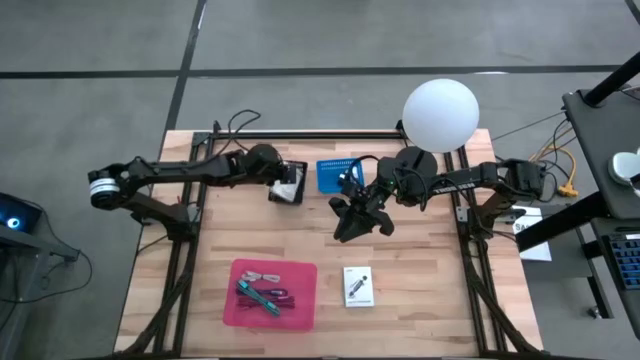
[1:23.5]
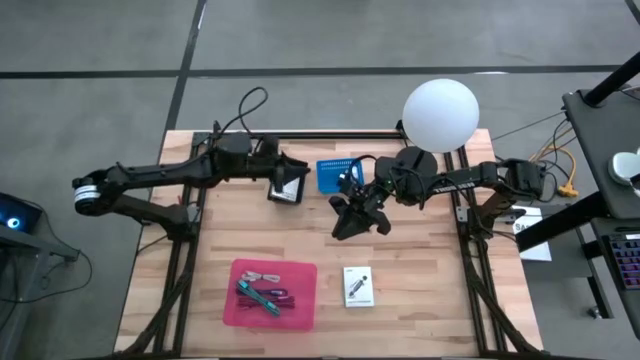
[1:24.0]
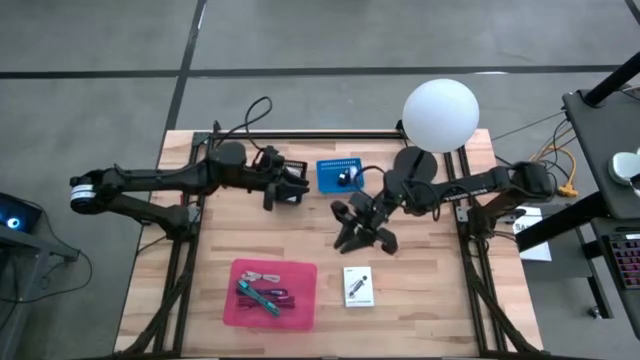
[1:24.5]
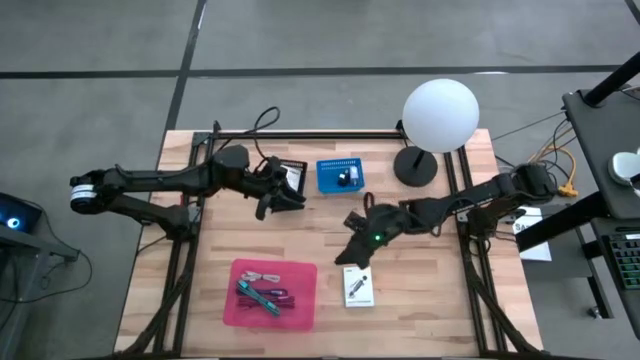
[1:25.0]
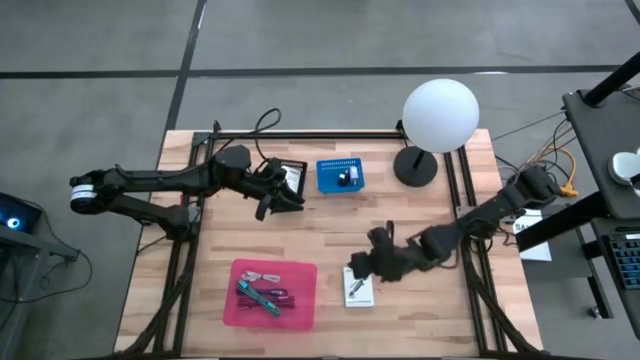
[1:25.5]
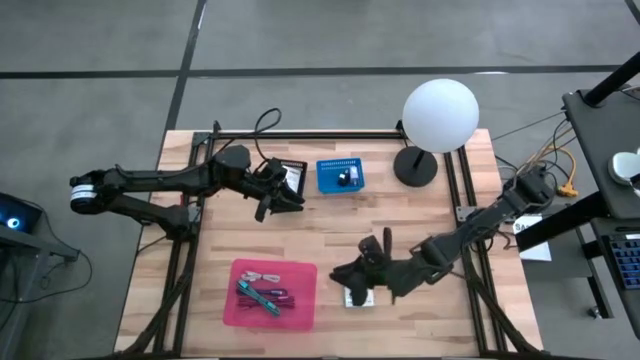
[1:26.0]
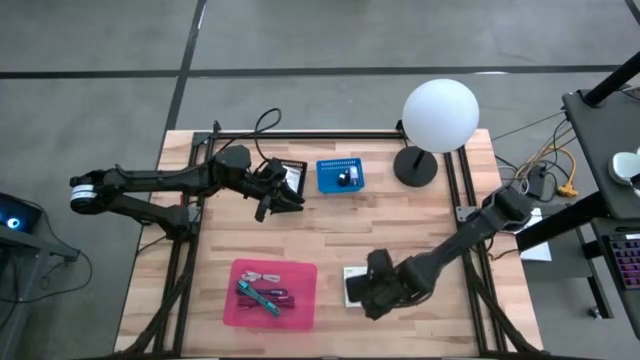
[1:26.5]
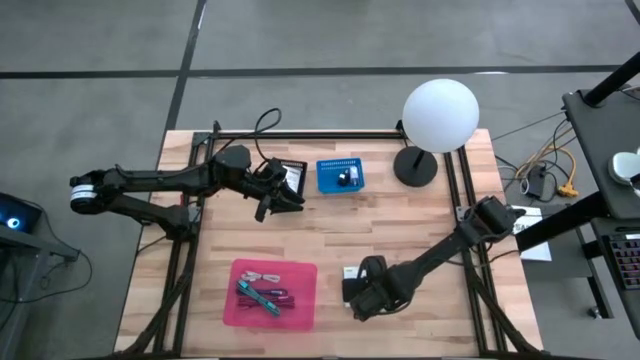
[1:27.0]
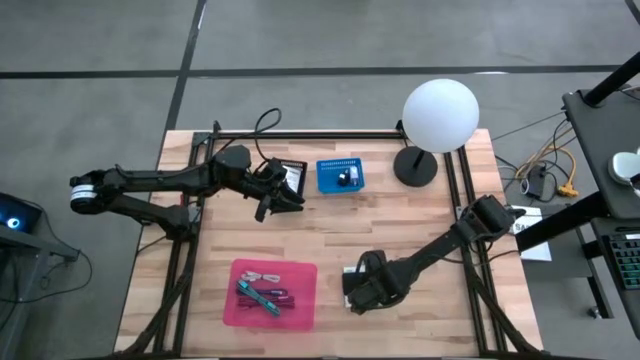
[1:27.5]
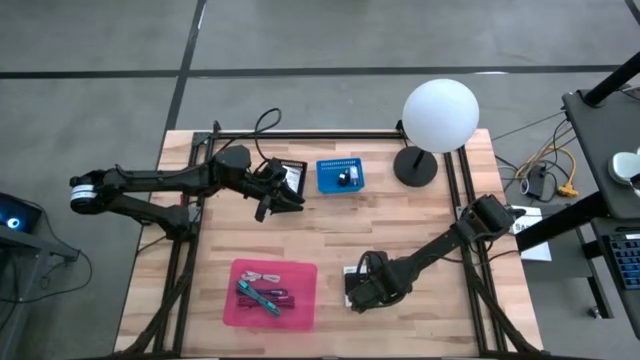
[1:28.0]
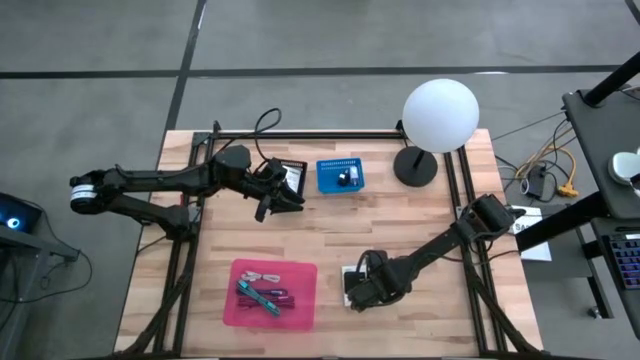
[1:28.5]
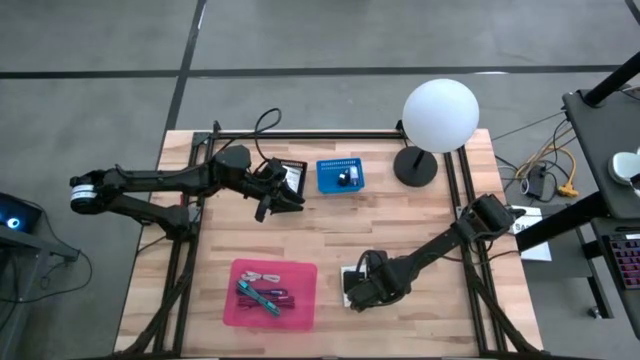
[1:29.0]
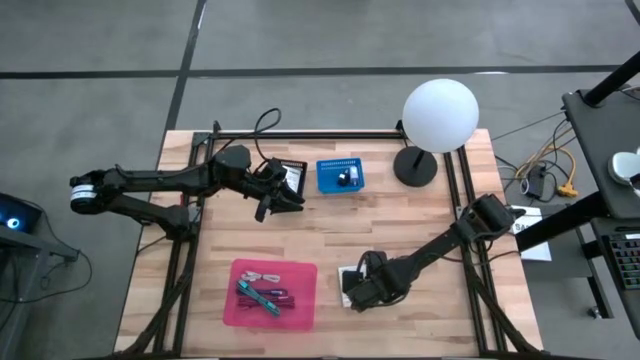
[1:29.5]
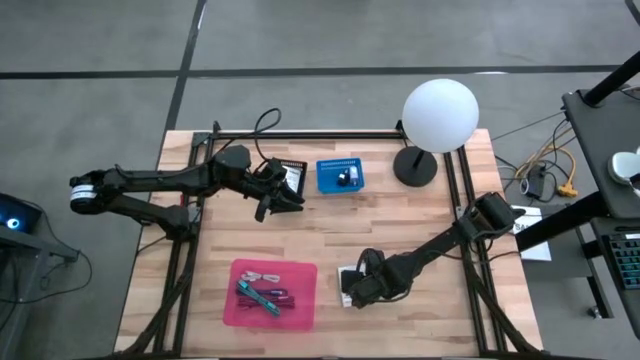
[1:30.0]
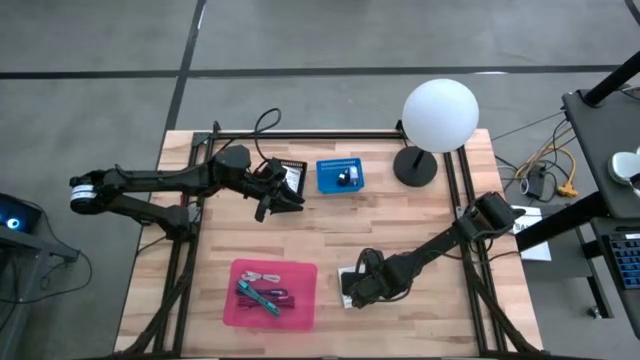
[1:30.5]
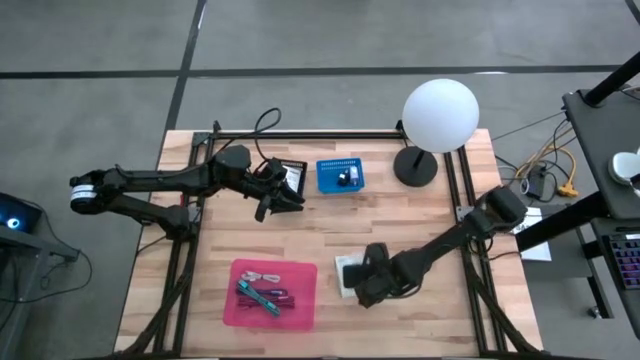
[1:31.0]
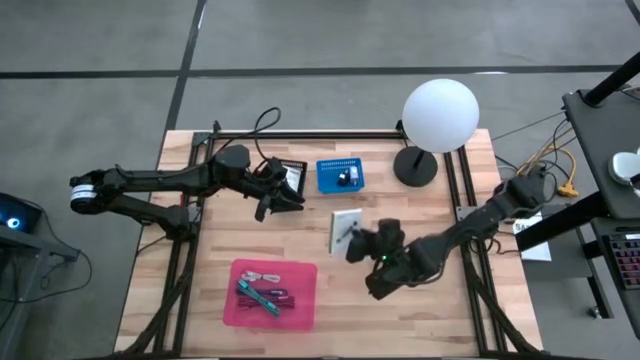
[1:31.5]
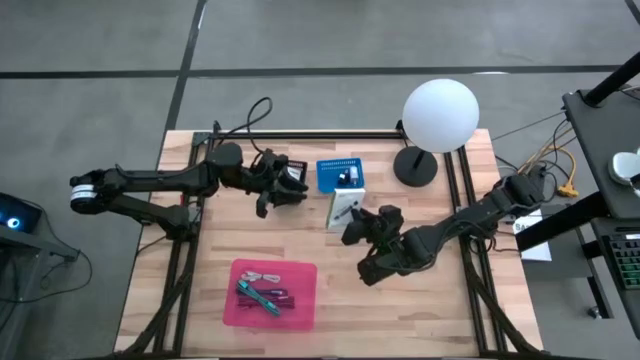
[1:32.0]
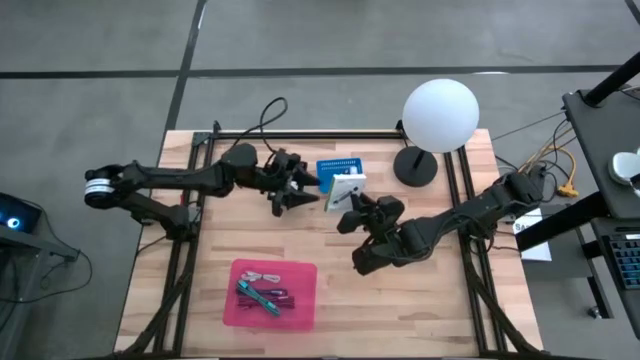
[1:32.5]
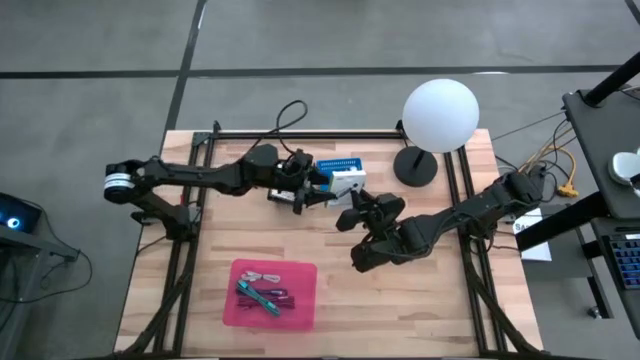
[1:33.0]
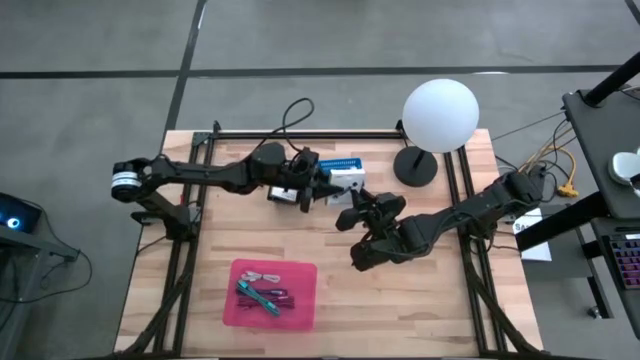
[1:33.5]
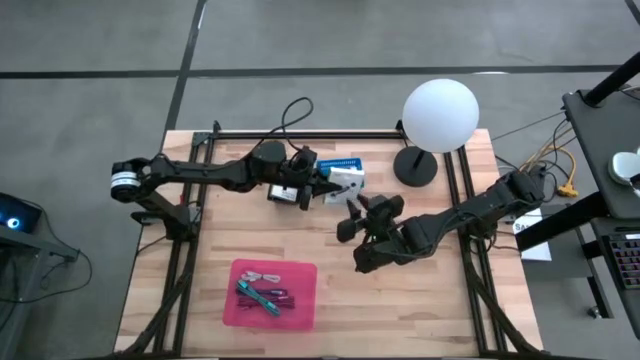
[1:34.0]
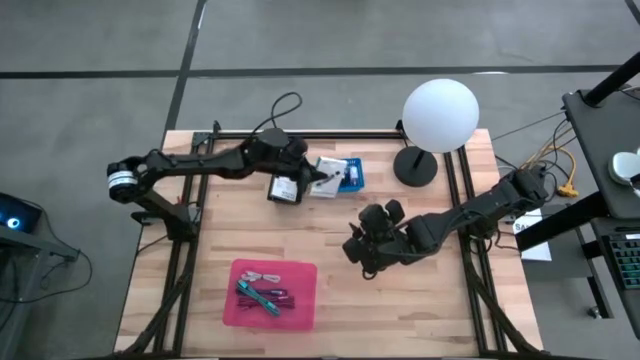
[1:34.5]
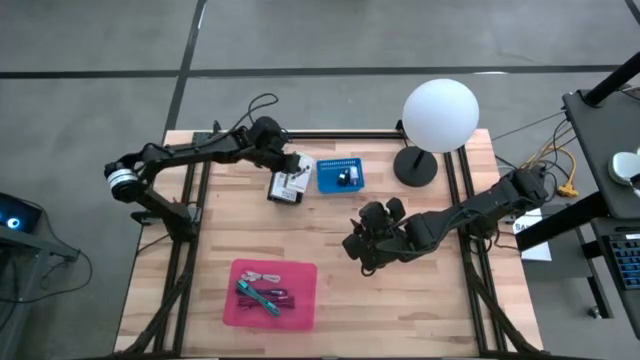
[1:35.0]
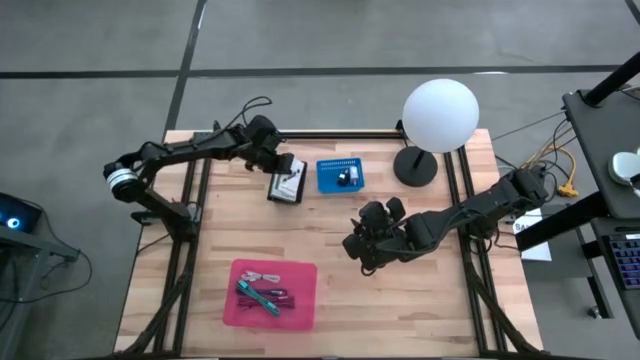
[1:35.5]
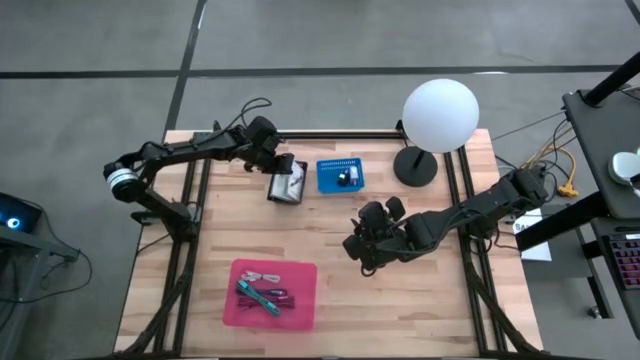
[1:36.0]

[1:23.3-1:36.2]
Task: Pick and place items into bin
Put the white card reader box into the black basket

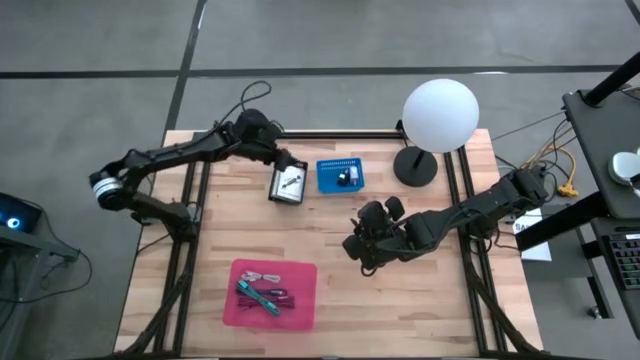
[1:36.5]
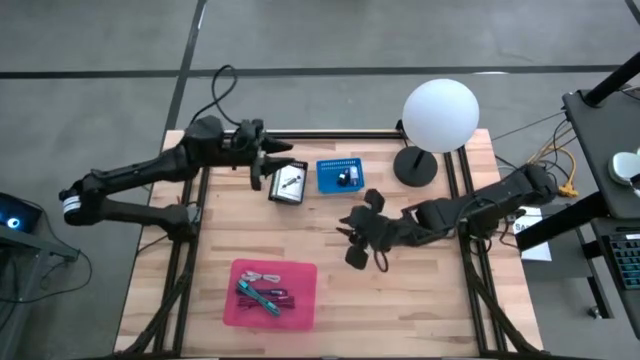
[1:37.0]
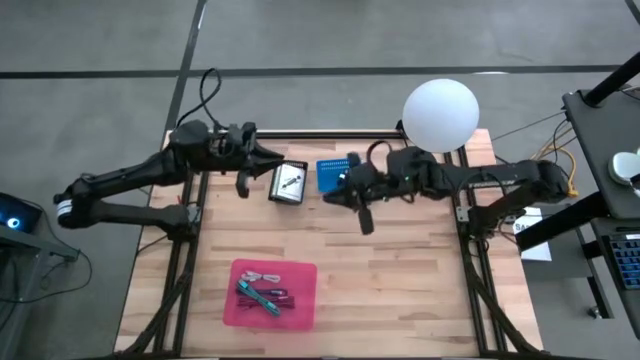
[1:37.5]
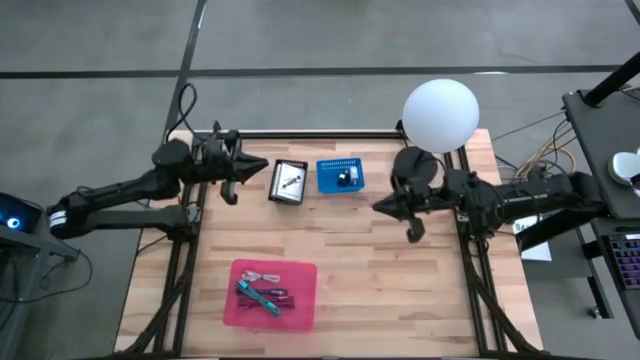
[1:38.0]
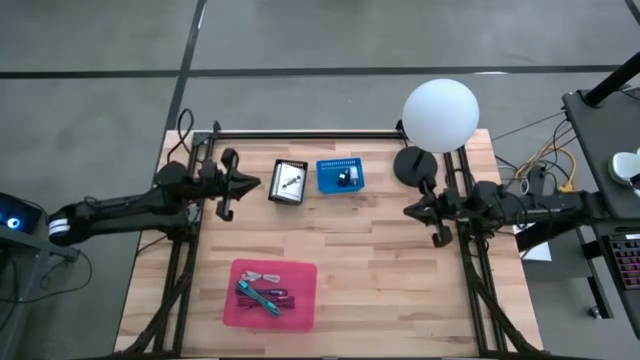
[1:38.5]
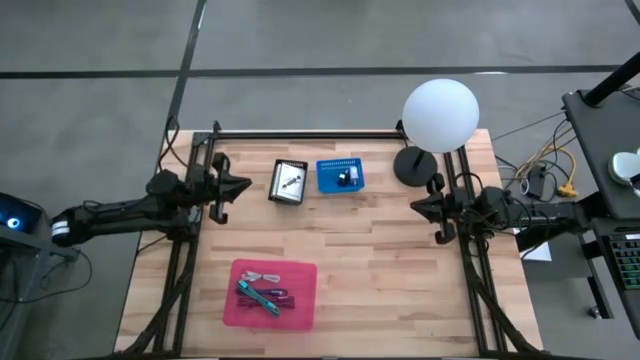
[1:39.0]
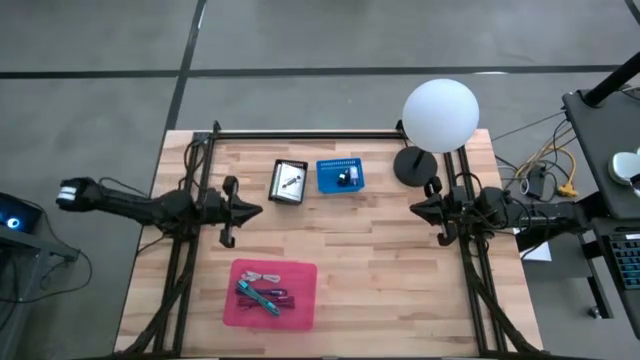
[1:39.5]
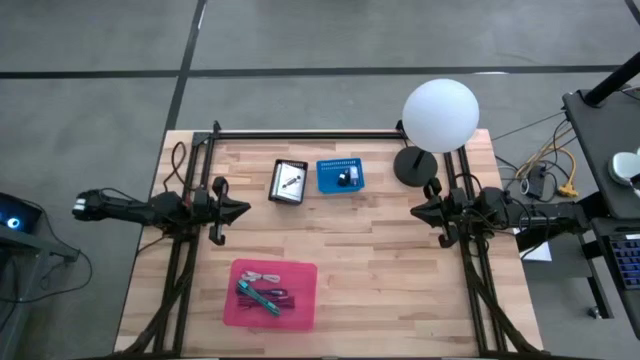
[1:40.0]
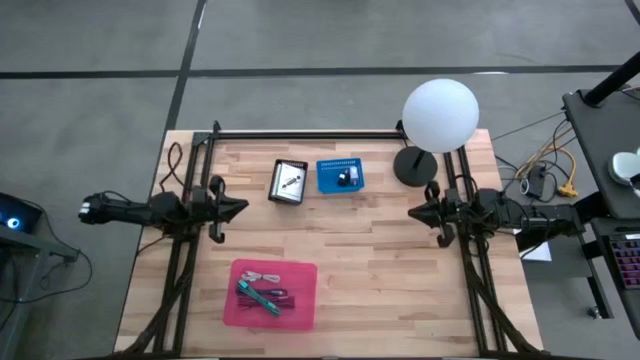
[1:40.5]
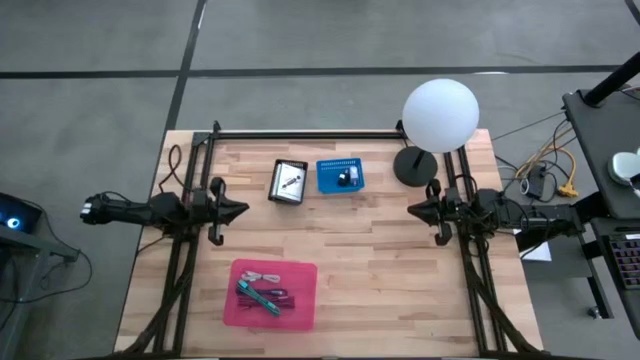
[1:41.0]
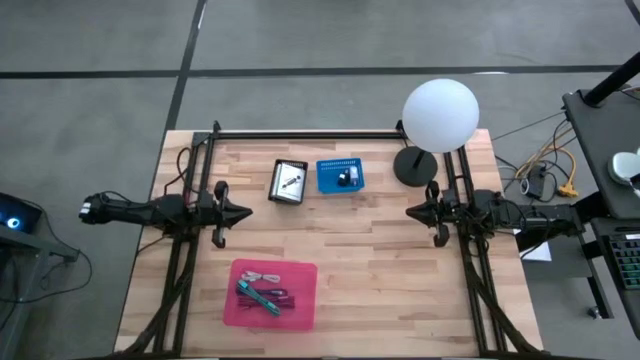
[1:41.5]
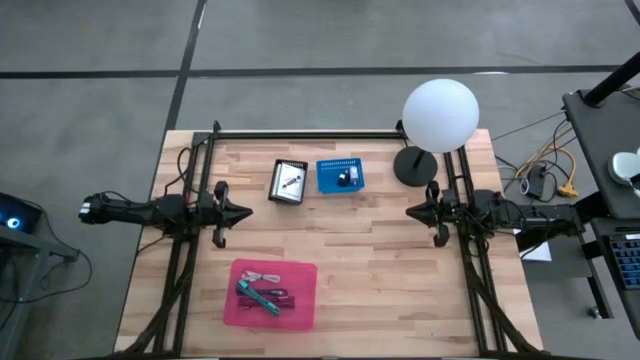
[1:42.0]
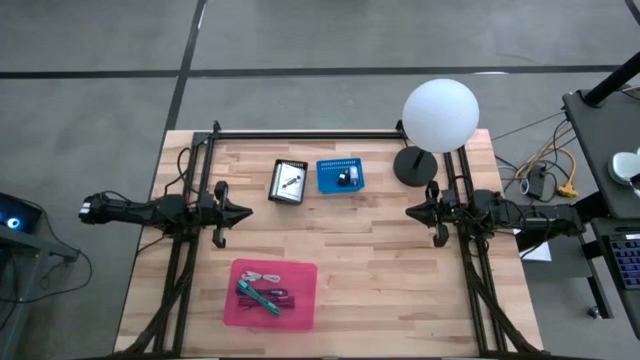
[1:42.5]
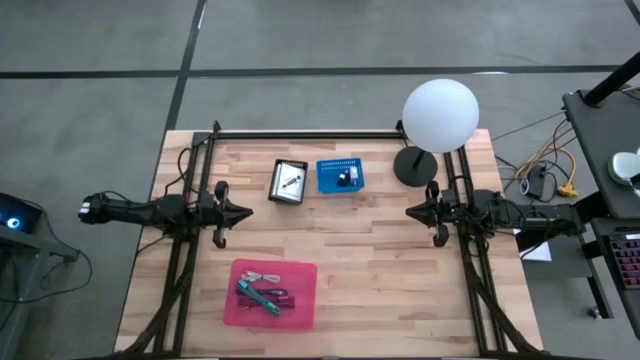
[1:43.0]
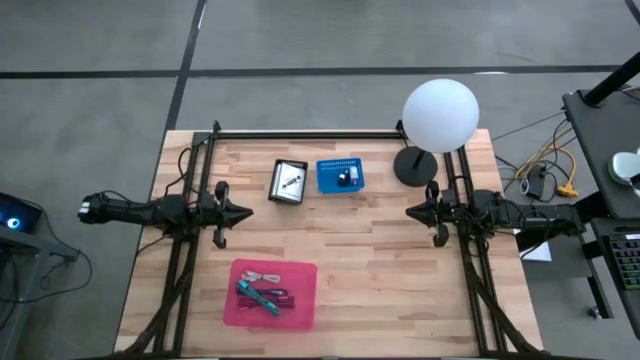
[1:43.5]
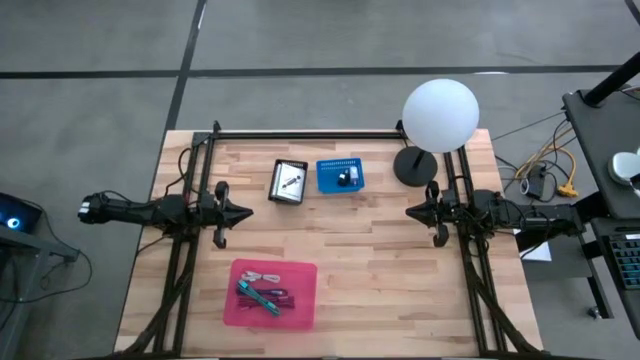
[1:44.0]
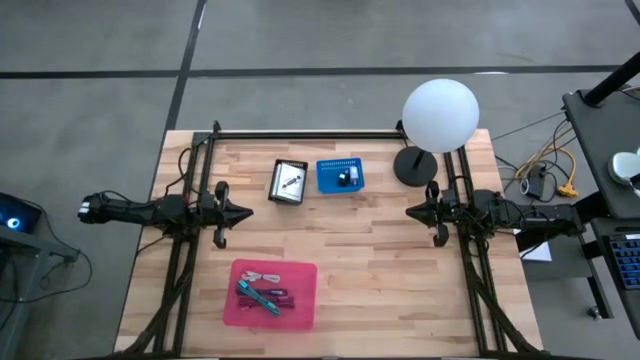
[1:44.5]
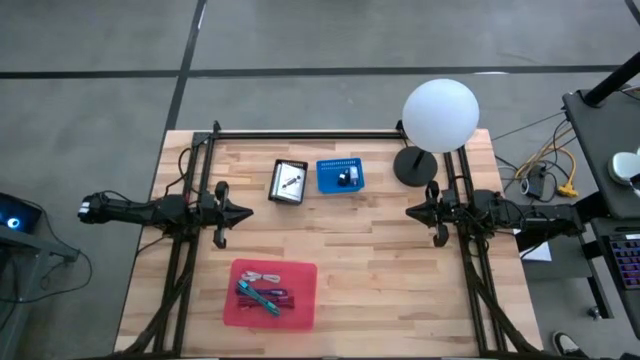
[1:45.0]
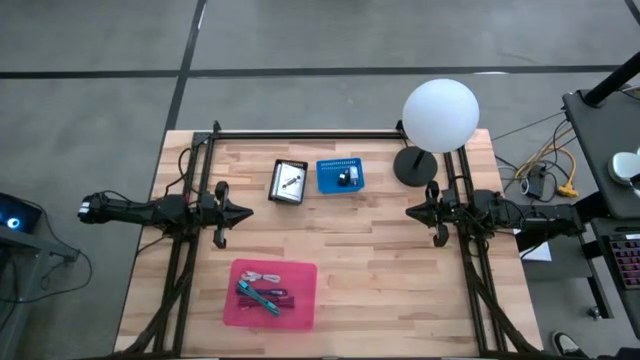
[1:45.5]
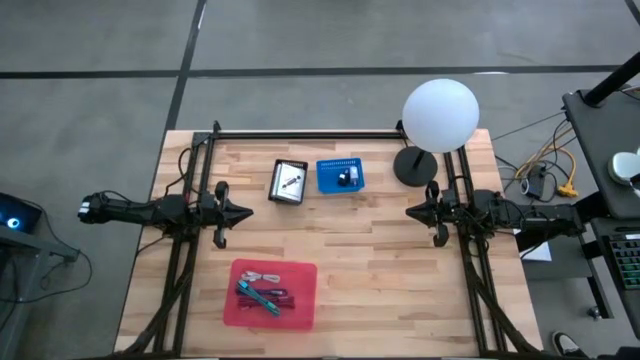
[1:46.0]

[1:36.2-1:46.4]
Return to Home Position
